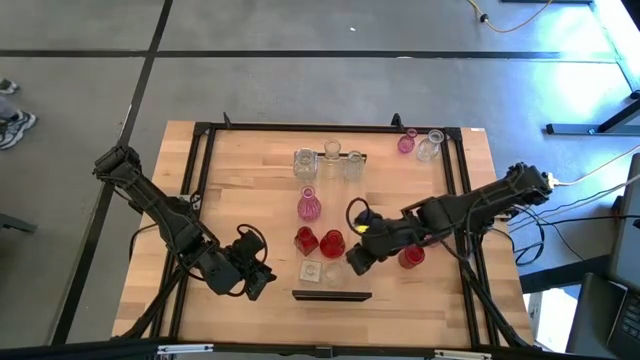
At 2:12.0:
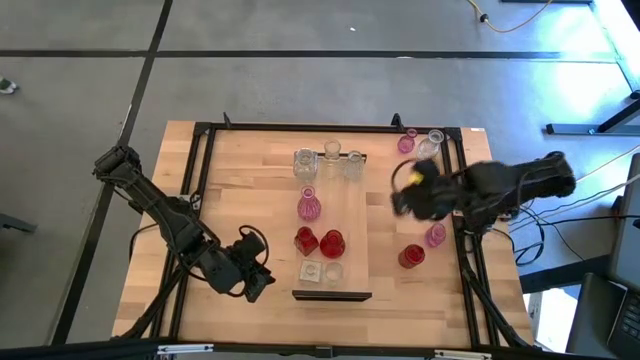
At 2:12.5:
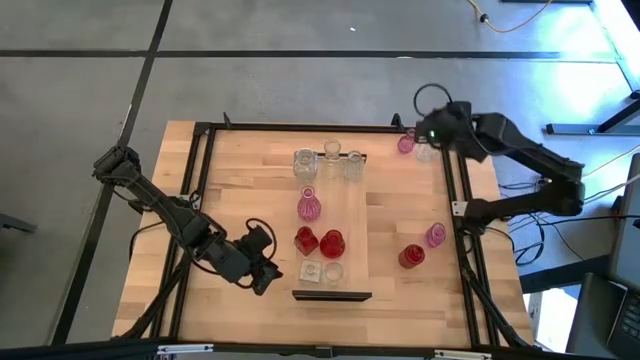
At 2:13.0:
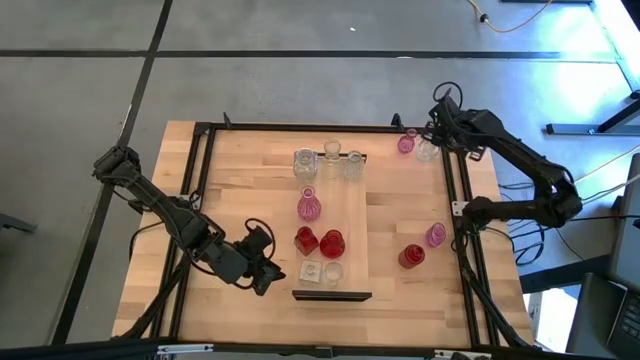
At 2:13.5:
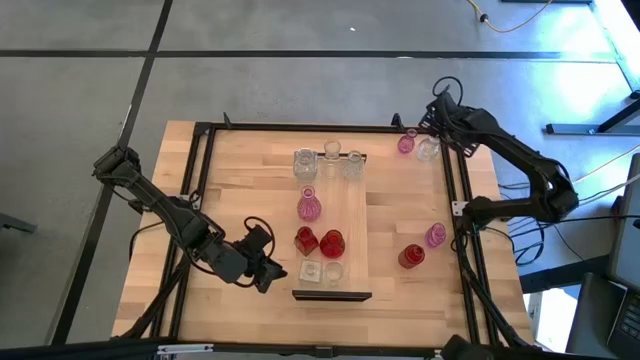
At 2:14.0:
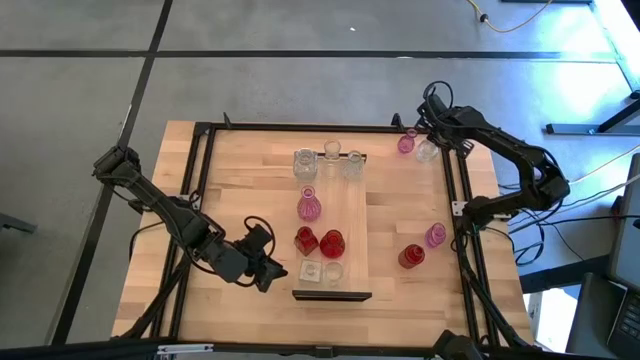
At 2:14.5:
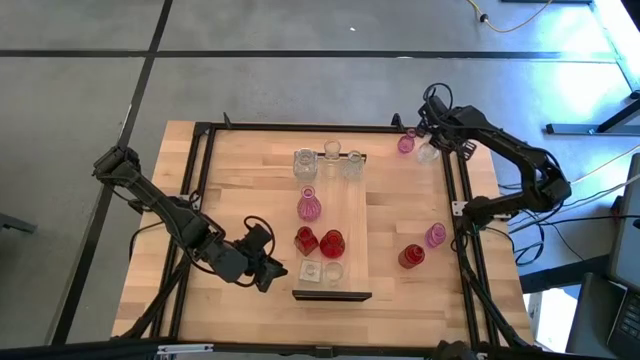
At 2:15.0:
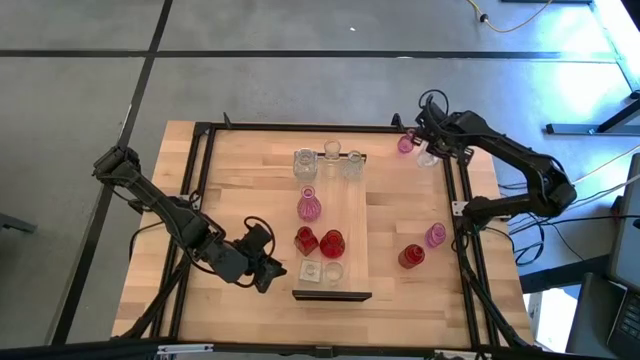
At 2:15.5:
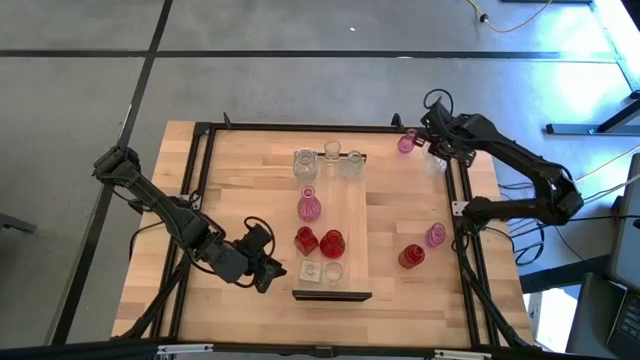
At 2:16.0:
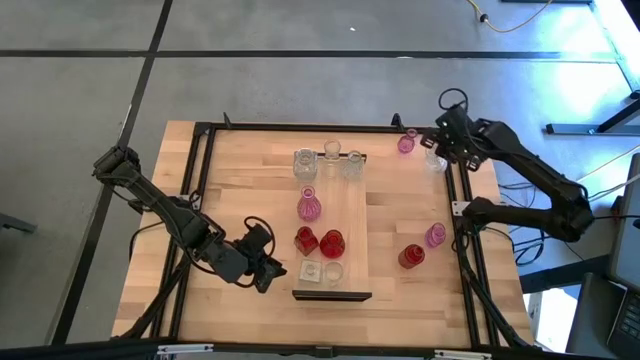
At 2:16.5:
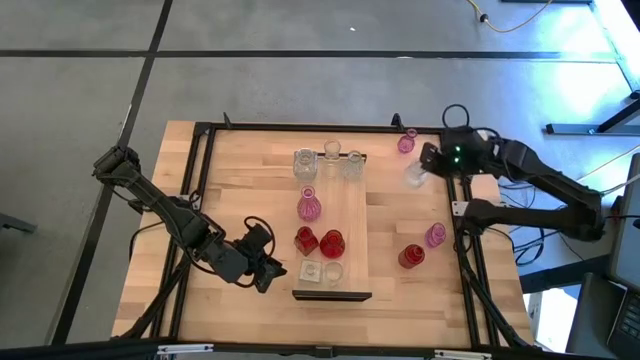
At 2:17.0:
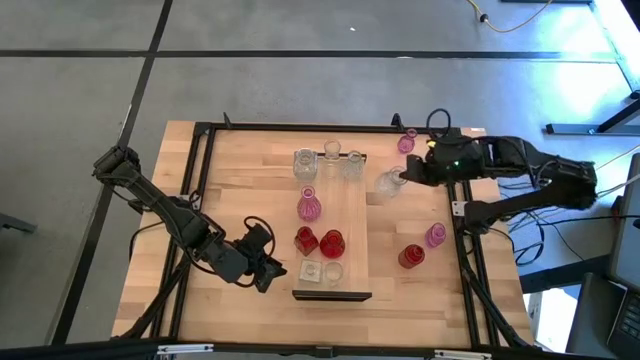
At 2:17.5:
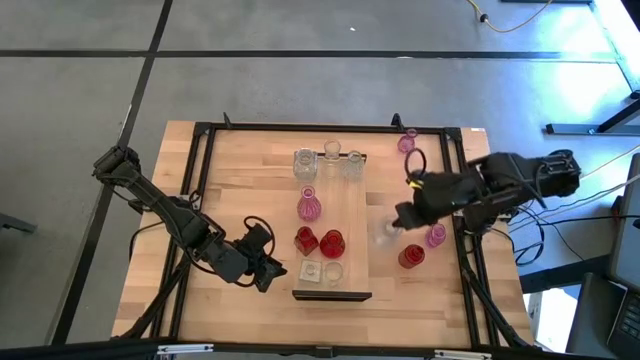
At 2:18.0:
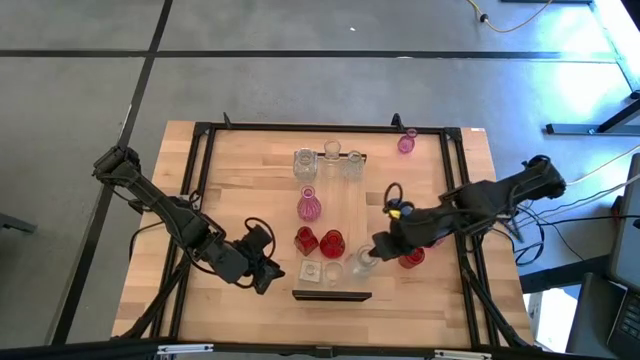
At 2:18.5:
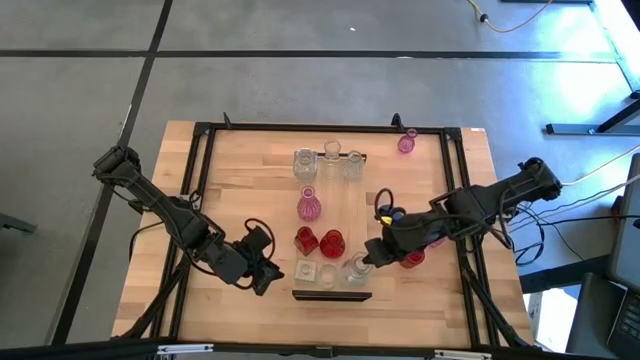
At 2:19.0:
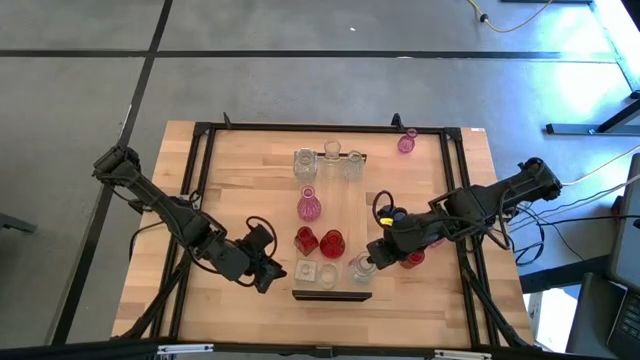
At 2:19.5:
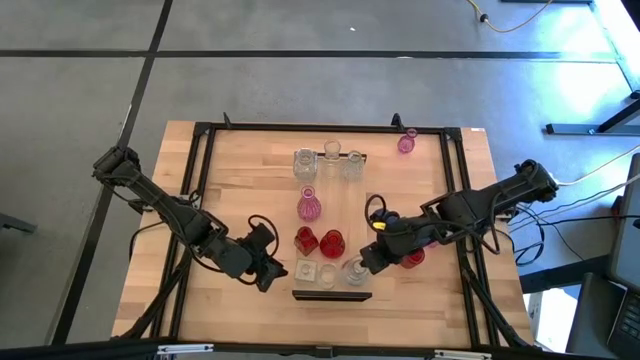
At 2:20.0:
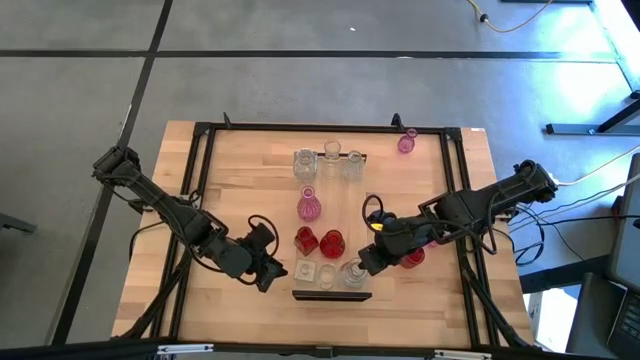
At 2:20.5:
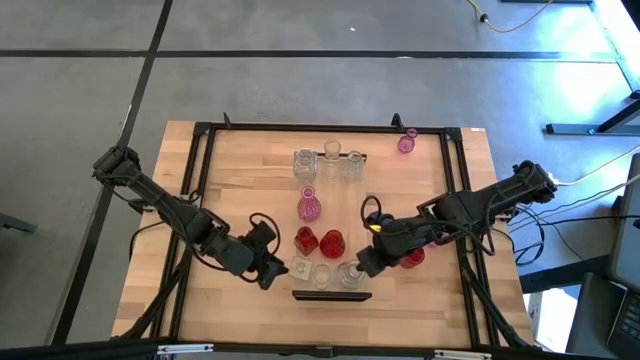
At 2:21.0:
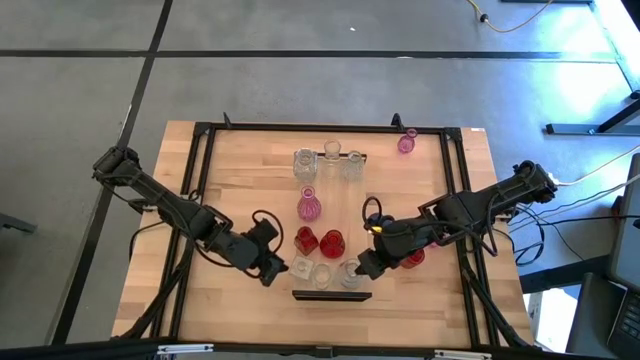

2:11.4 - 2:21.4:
Task: sort vases onto shelf
Put the transparent vase on the shelf aligned with the other transparent vases

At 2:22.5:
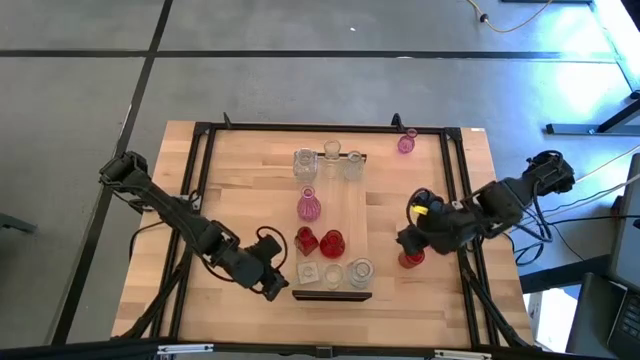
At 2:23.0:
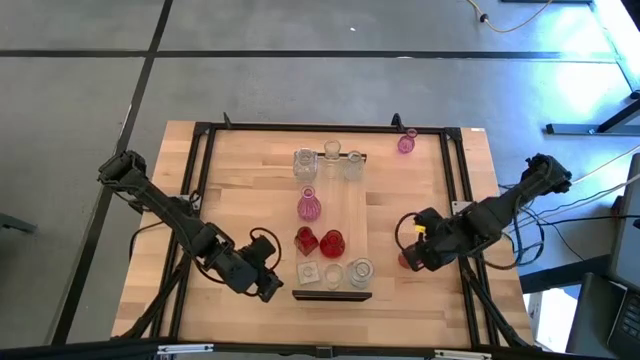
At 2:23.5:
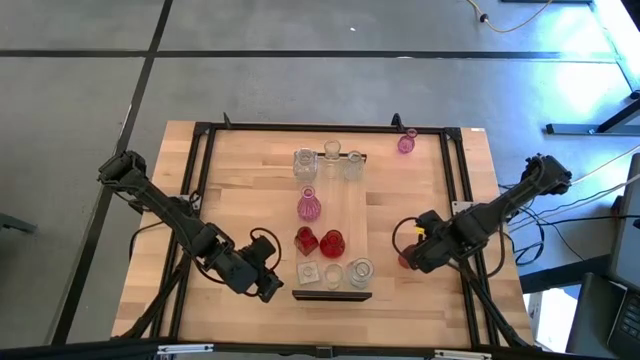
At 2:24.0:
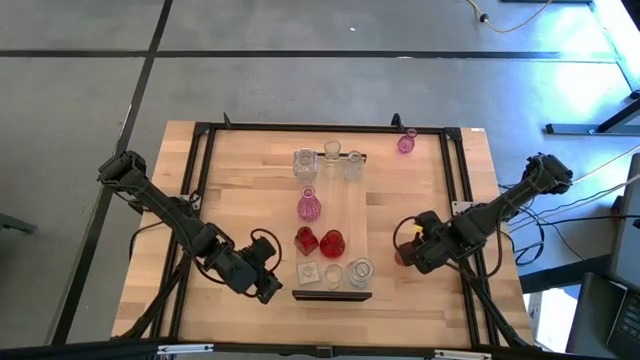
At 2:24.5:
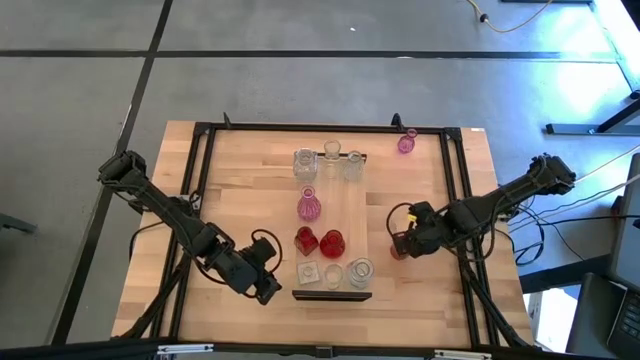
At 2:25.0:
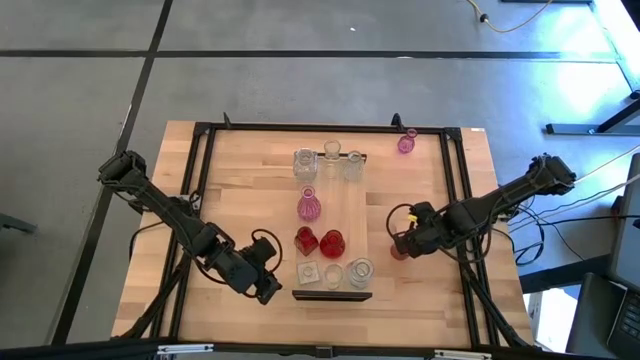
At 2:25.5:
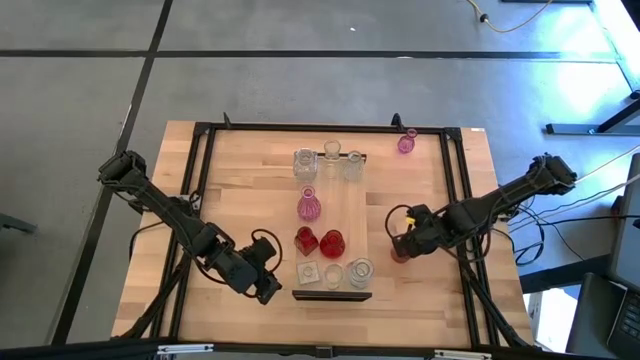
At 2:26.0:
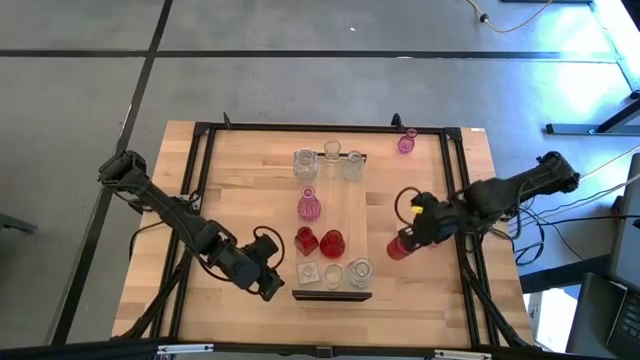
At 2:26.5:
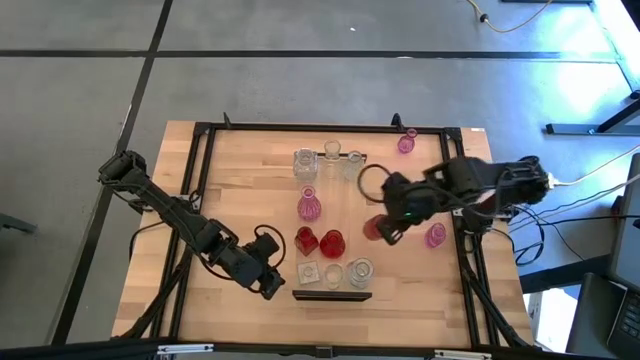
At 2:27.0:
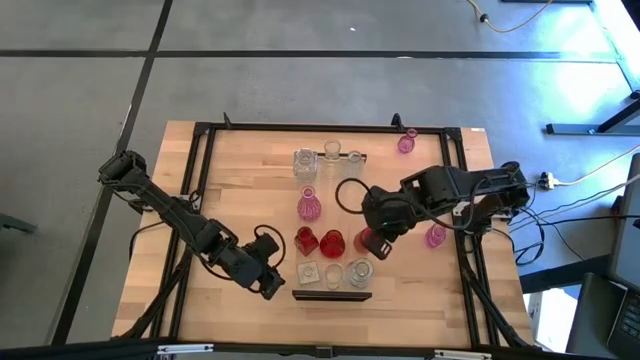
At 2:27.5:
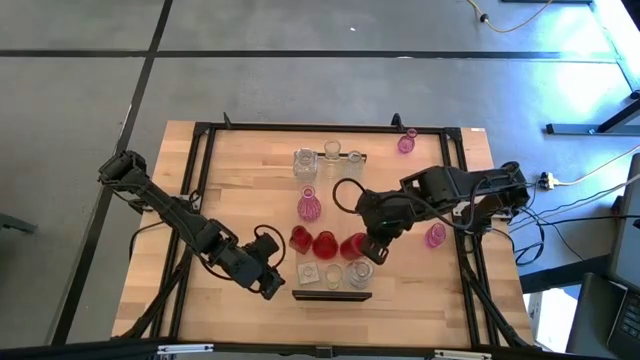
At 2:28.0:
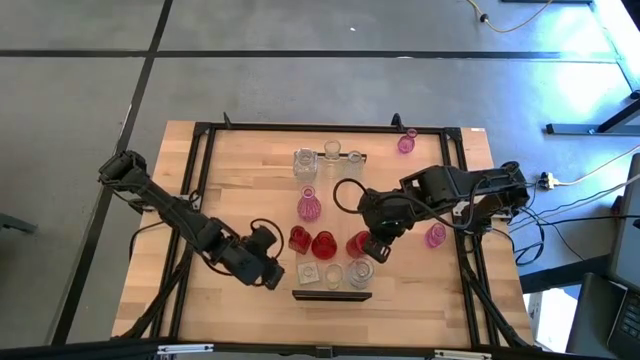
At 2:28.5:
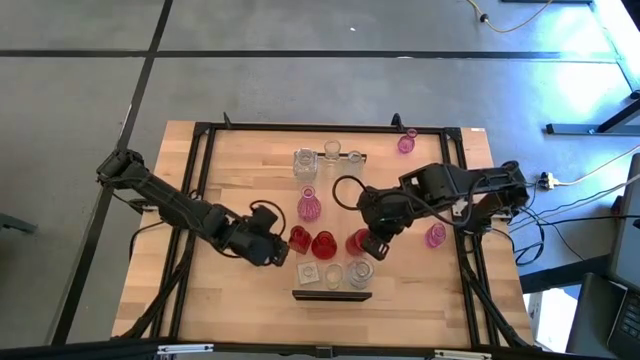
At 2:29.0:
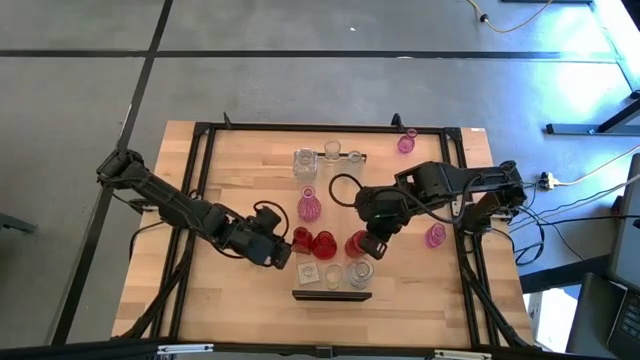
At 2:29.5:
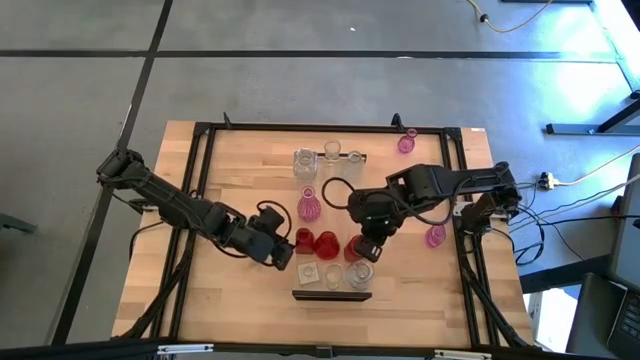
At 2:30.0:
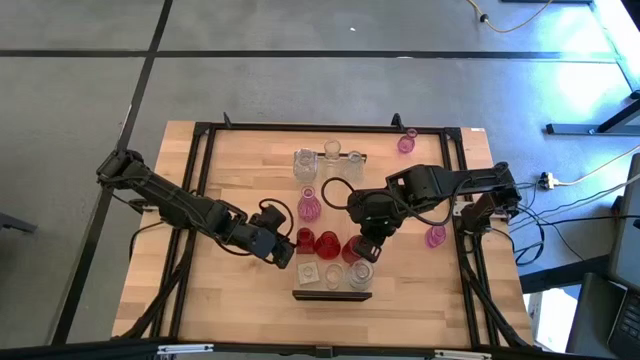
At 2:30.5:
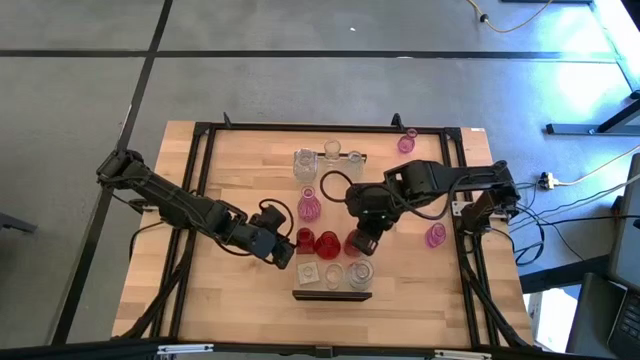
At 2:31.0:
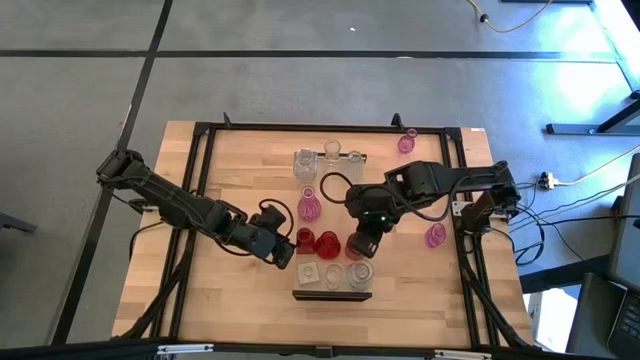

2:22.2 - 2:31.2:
Put the red vase on the shelf aligned with the other red vases
